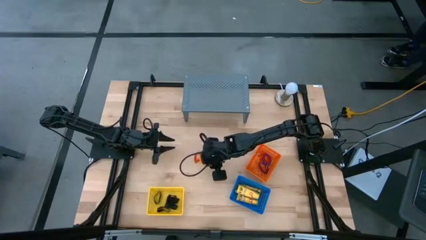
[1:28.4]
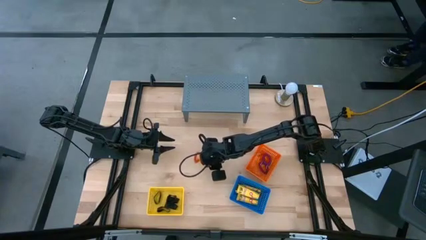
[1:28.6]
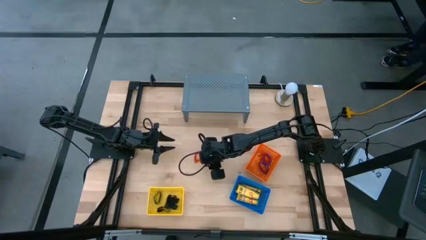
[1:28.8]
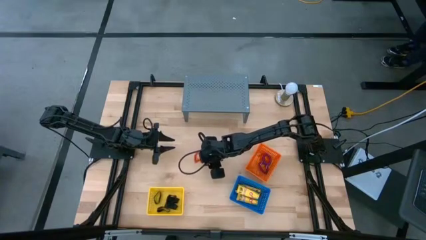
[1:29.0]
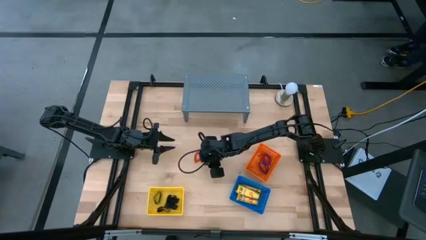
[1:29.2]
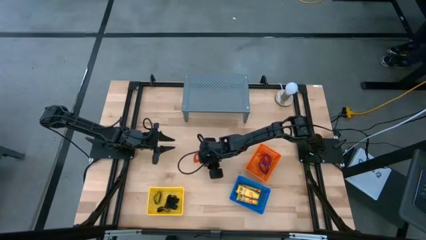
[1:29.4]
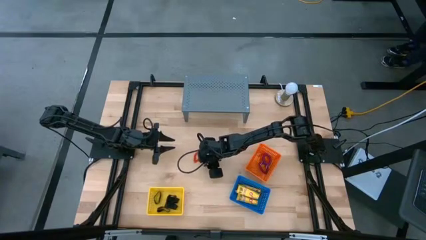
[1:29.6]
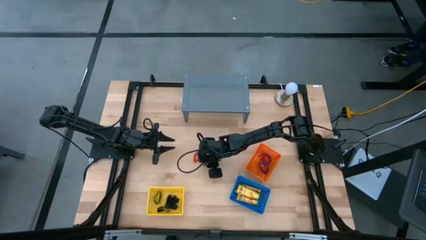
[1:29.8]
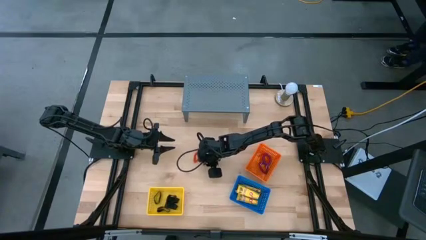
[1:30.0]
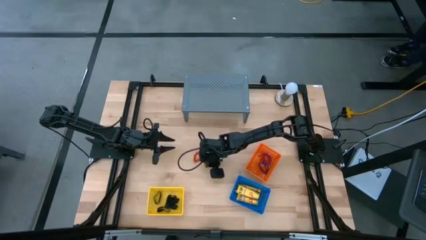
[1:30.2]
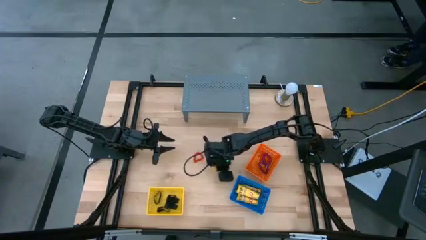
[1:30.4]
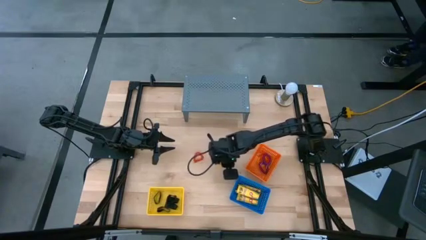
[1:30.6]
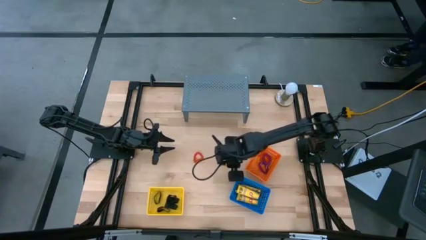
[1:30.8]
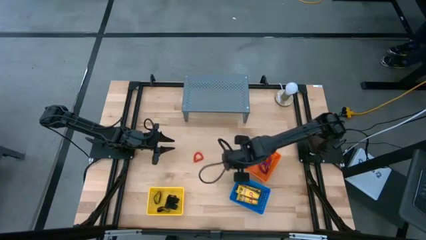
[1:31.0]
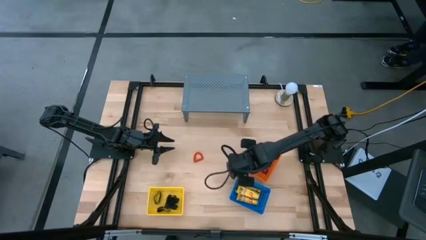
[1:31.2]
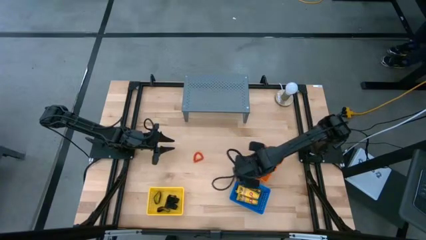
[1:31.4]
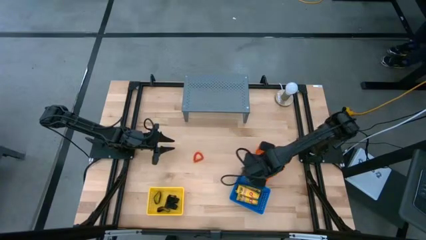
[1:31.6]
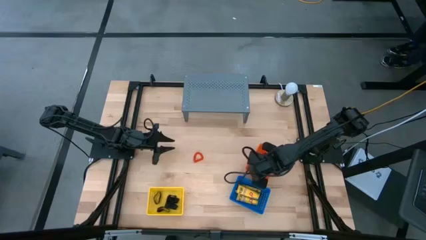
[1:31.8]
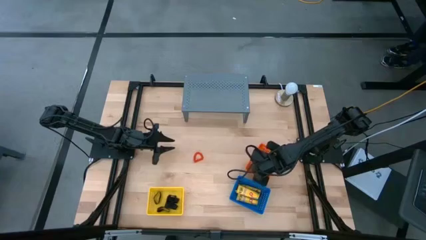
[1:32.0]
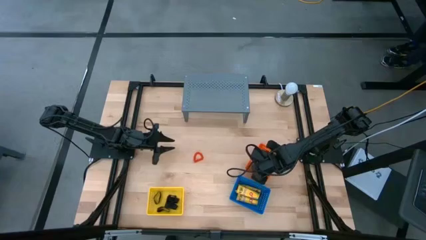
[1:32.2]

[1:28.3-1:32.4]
Task: Pick & Place Office Desk Supplies
Put the yellow spring keychain into the orange basket

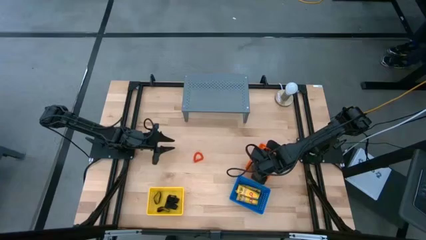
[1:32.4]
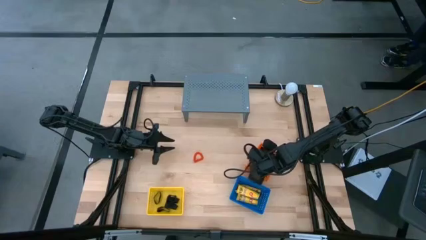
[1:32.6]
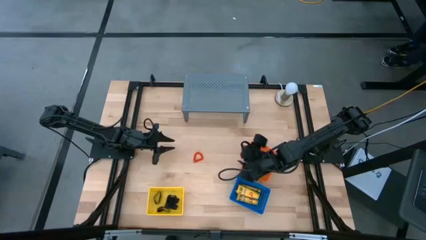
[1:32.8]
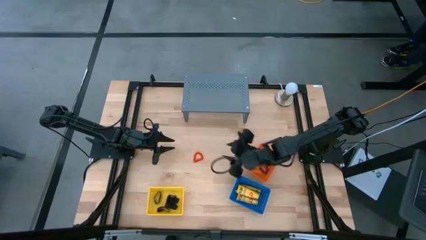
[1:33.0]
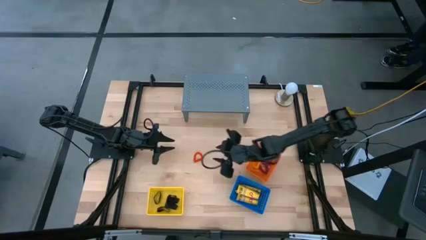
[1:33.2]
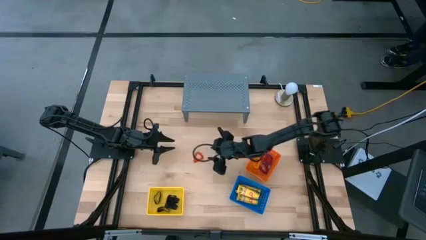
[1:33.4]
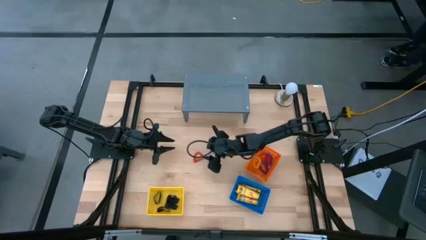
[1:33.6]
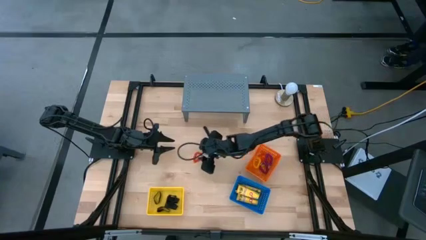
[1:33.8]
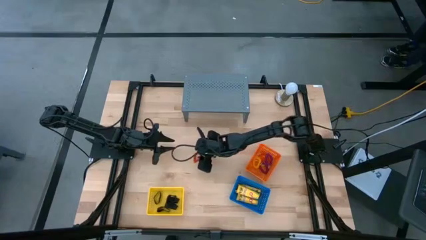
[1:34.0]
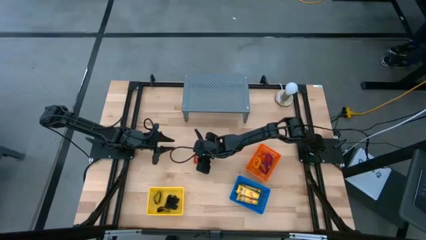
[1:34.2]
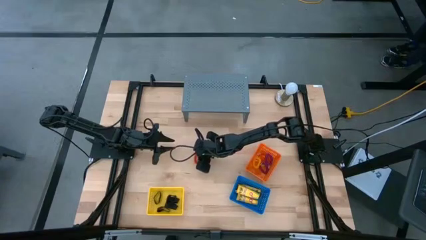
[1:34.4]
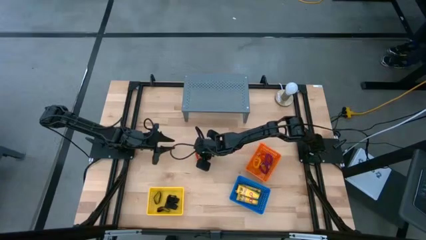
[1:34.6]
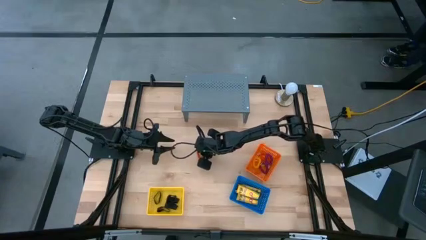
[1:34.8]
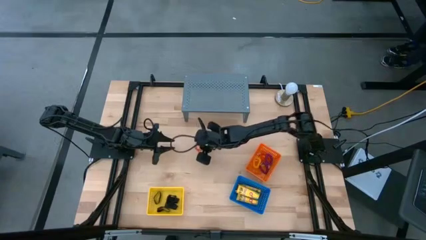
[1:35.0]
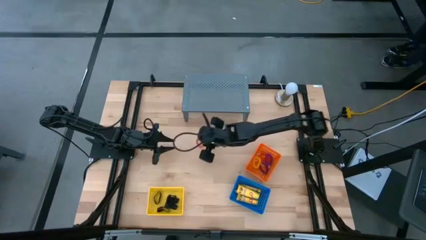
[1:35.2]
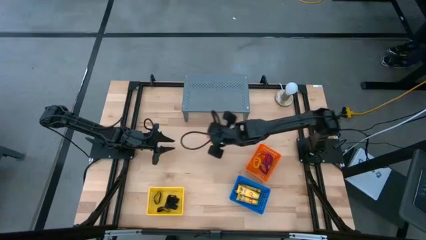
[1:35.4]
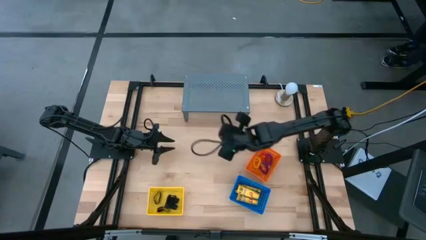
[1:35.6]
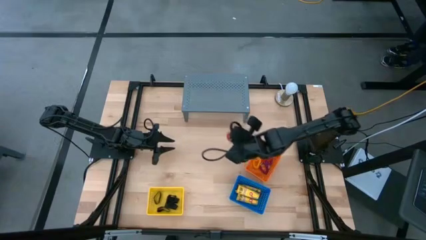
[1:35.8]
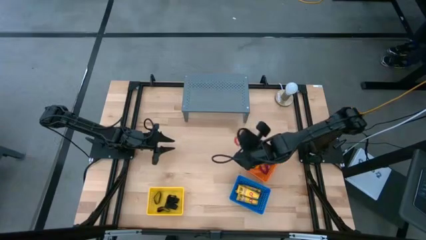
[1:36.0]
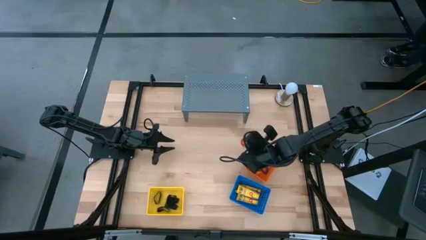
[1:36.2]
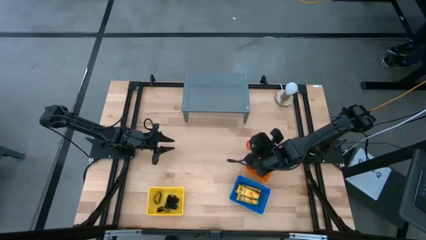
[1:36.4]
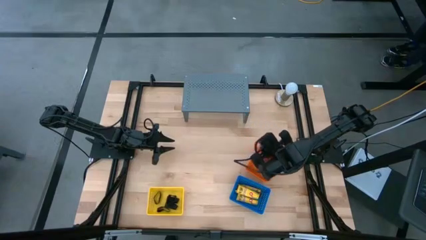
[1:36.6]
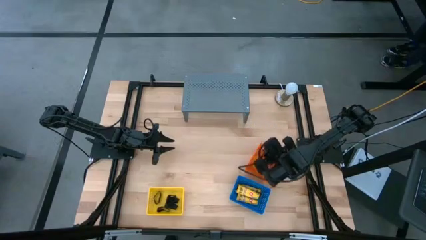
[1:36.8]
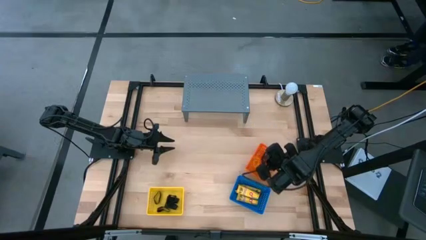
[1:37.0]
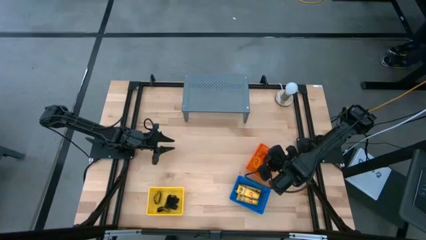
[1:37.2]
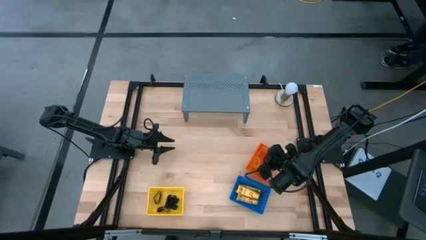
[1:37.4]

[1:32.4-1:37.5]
Put the orange spring keychain into the orange basket

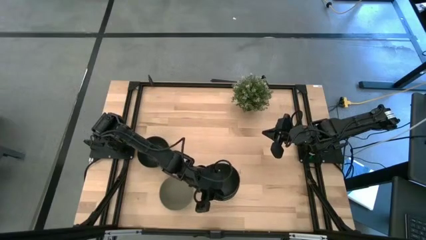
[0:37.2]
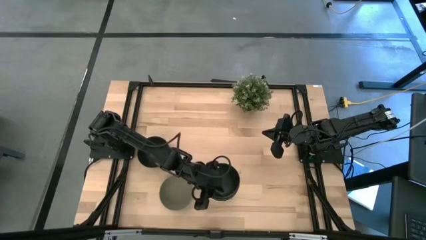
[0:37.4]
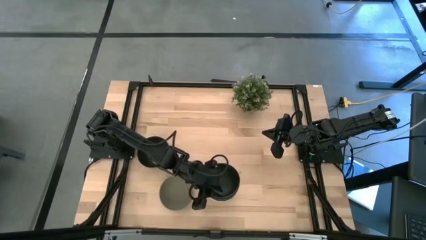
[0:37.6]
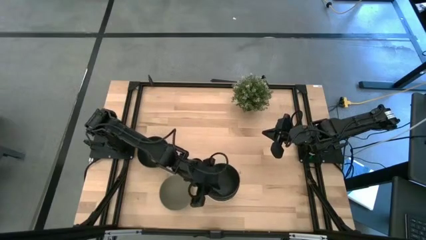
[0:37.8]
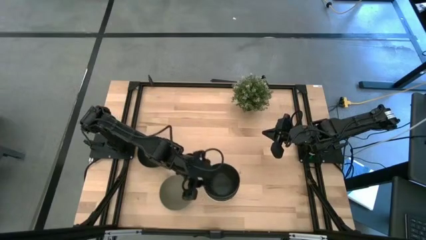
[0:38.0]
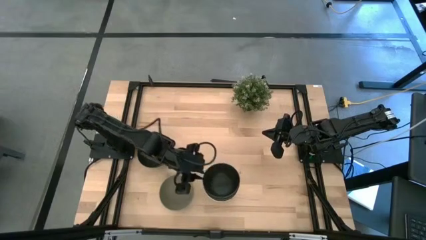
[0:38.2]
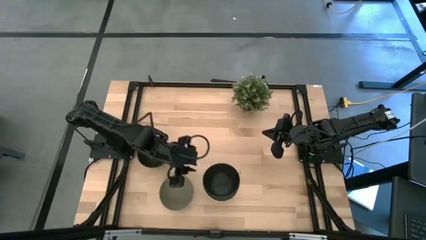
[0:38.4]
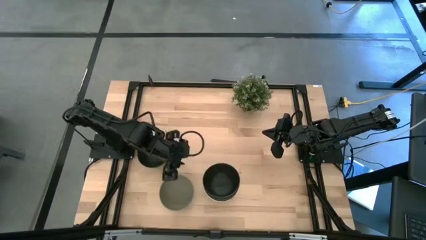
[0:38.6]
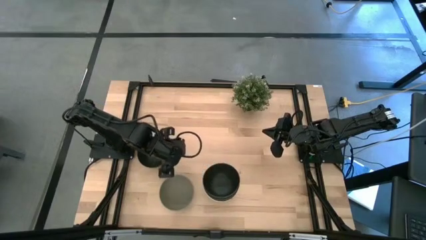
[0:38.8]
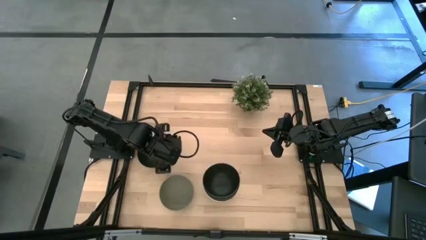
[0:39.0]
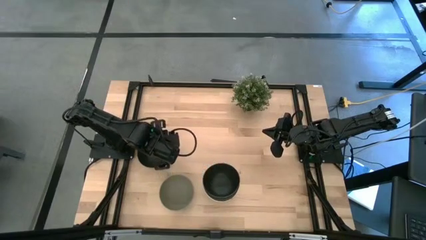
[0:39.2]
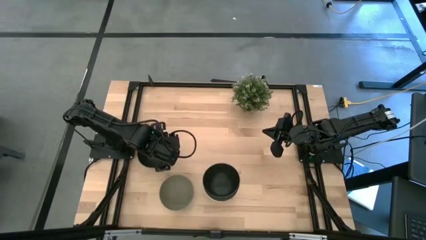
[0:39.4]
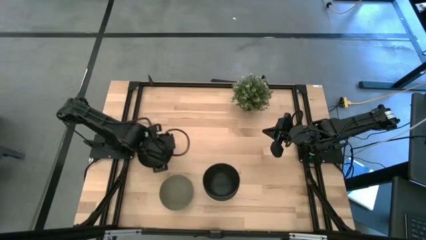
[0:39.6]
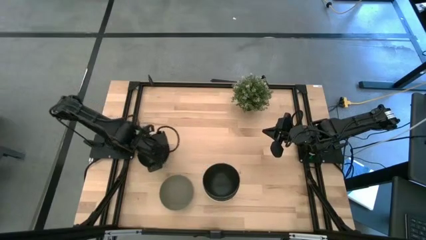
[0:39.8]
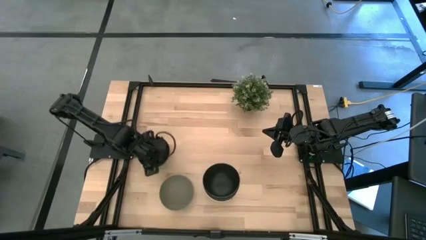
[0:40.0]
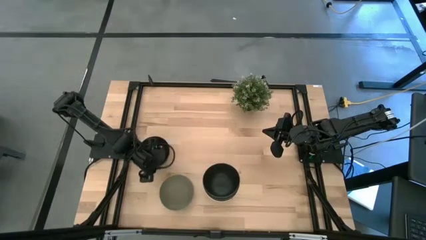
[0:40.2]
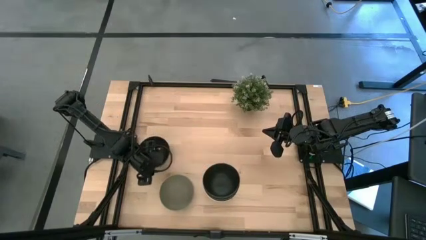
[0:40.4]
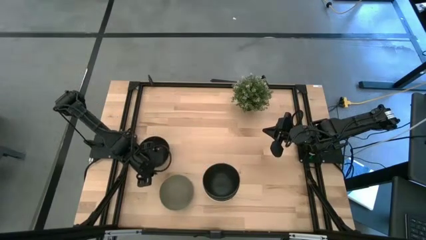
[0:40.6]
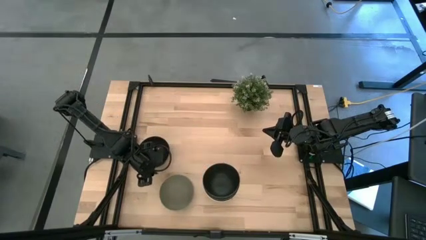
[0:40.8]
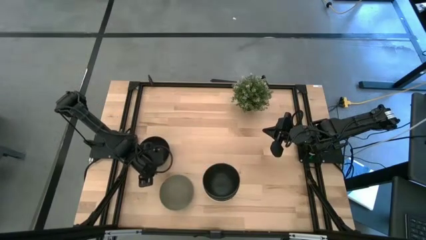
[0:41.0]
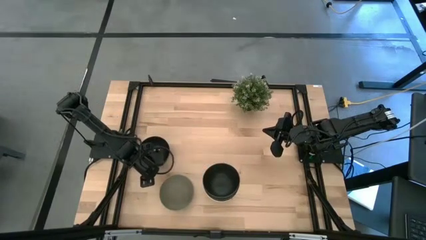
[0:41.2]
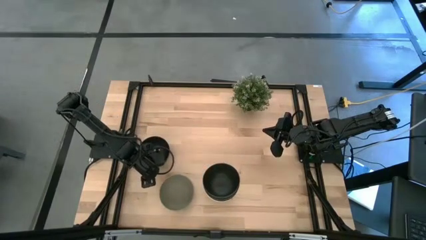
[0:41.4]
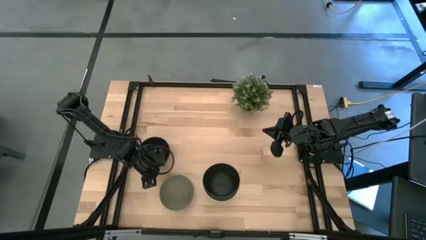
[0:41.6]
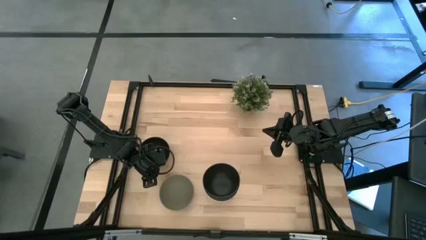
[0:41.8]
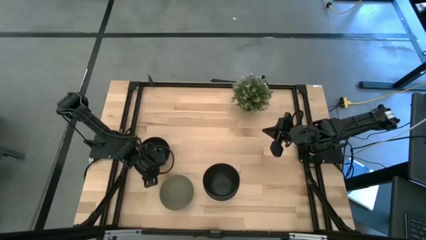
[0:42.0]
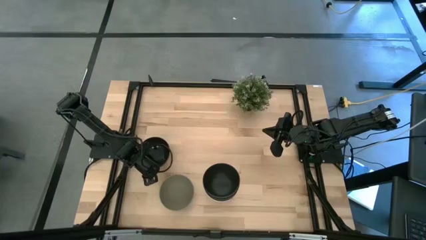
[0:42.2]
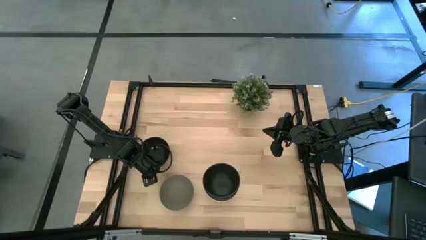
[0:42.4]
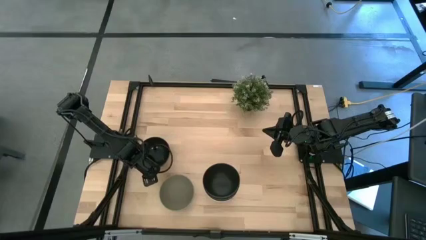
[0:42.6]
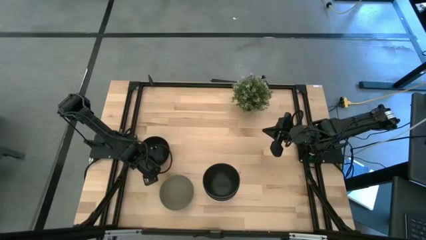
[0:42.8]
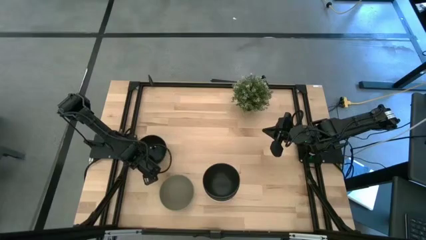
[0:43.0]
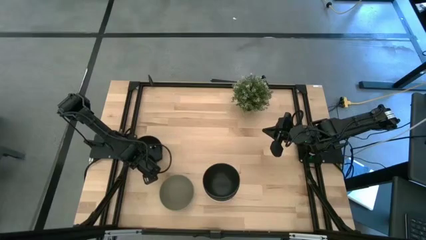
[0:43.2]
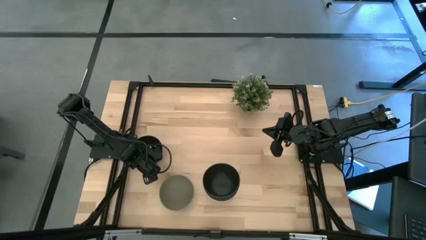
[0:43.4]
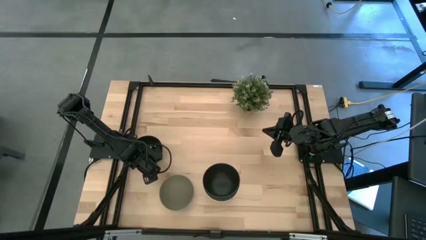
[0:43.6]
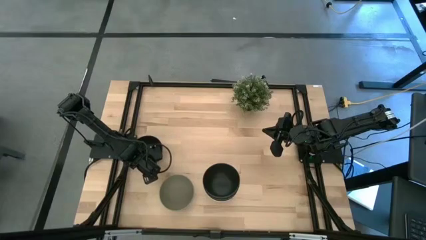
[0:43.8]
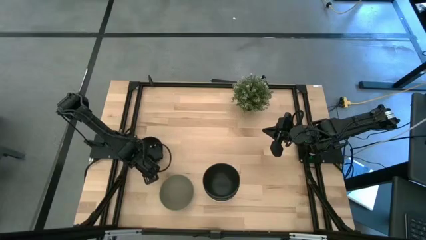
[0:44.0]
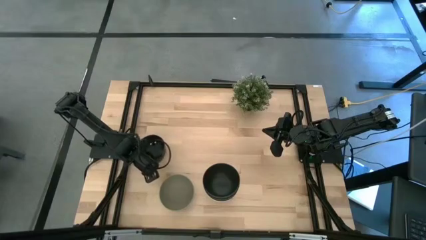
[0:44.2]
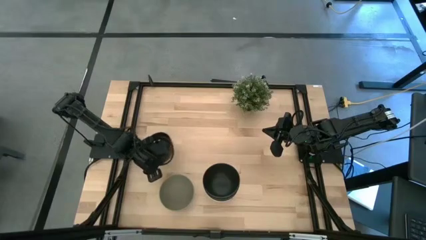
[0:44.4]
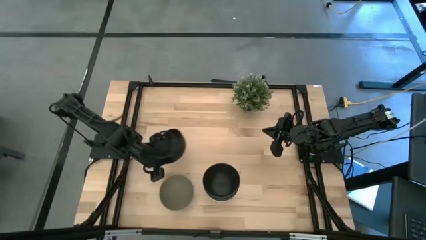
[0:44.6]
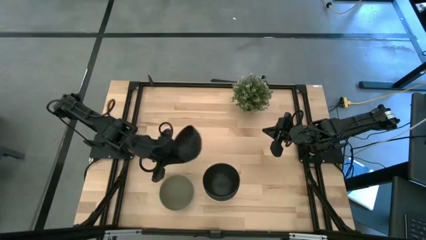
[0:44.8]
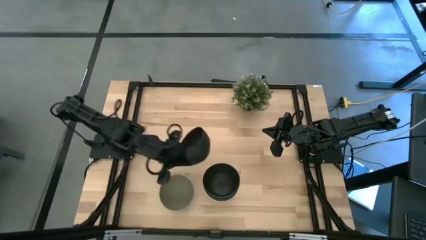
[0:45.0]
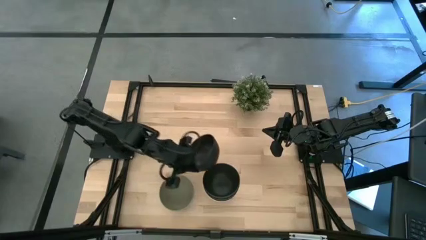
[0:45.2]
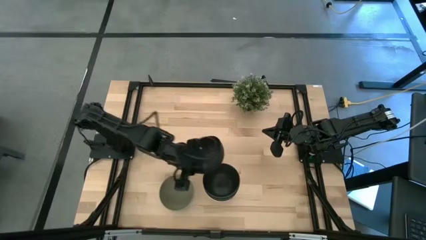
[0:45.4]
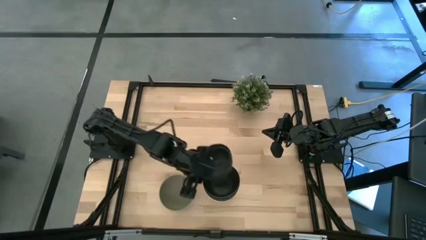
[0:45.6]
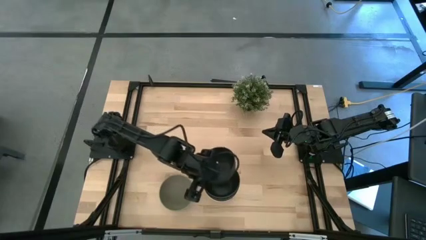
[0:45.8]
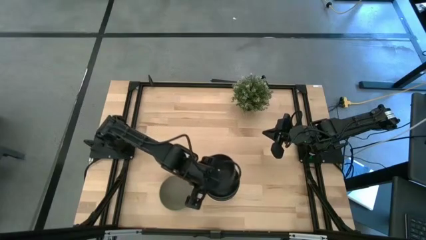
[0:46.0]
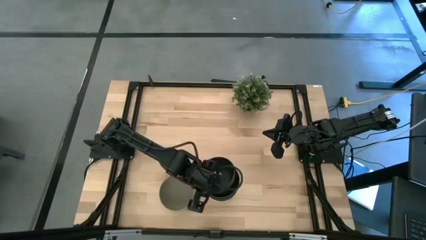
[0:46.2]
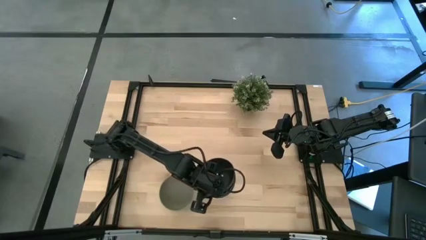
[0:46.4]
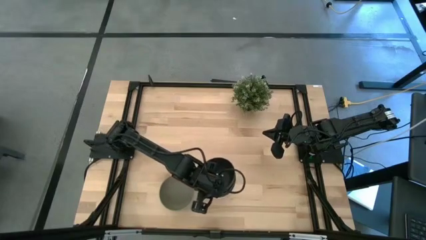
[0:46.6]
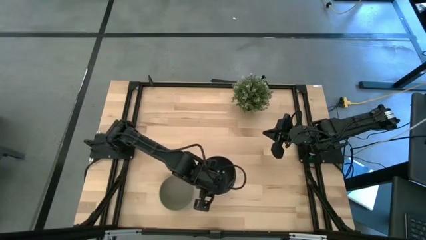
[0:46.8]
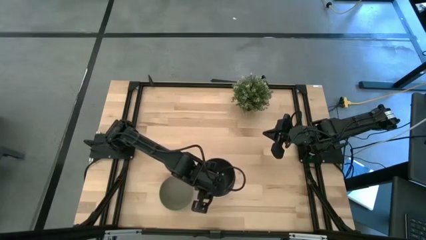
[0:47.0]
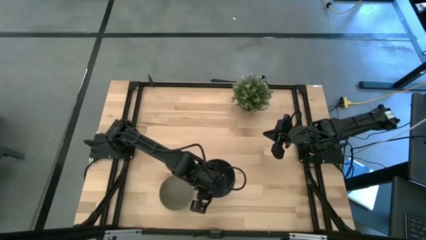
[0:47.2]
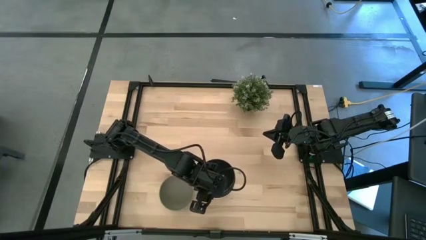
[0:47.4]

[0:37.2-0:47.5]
Task: Nest bowls inside each other
Stack the black bowl on top of the black bowl
